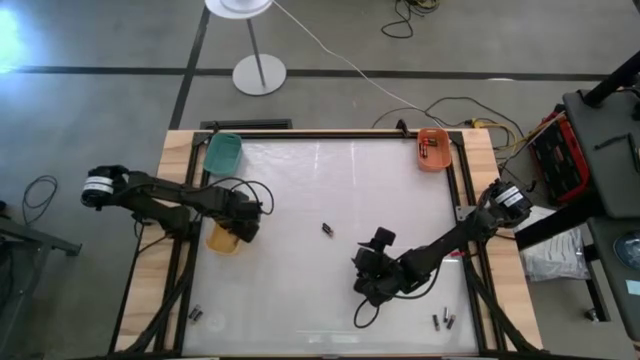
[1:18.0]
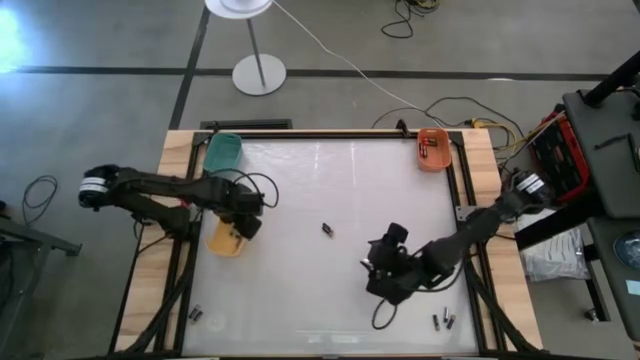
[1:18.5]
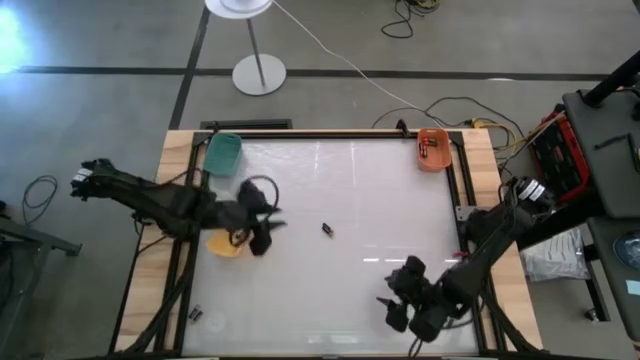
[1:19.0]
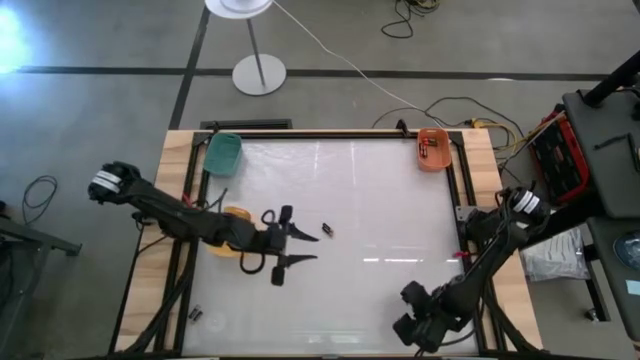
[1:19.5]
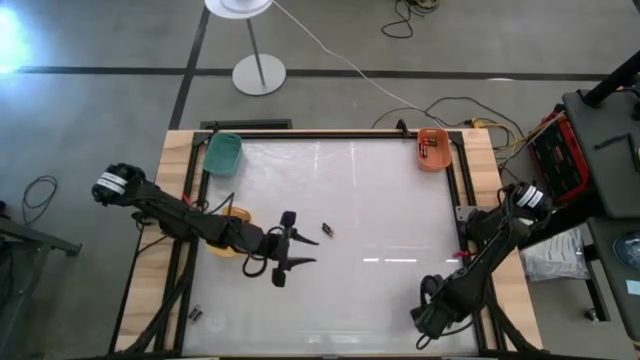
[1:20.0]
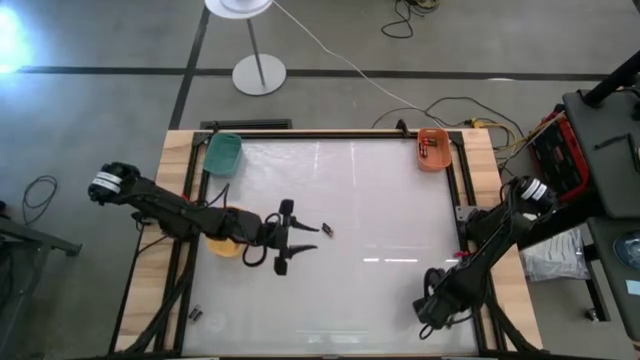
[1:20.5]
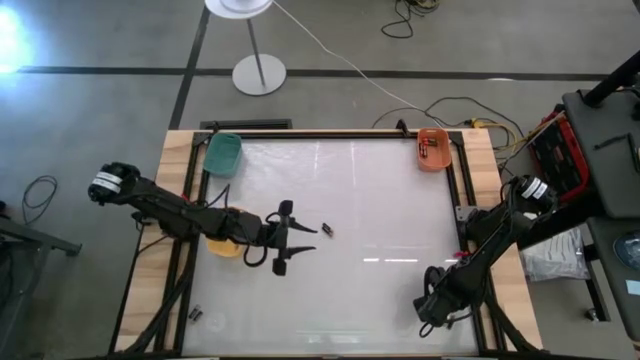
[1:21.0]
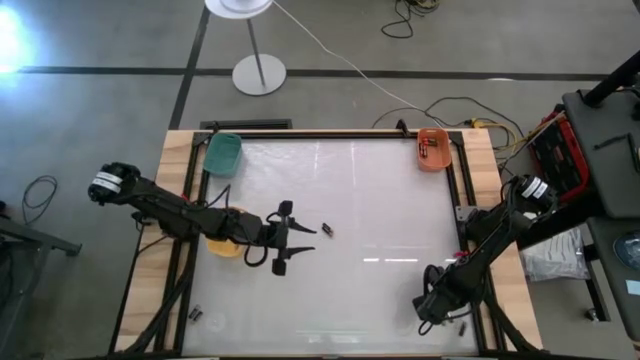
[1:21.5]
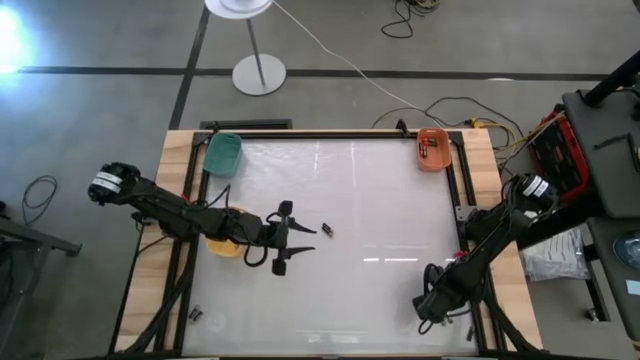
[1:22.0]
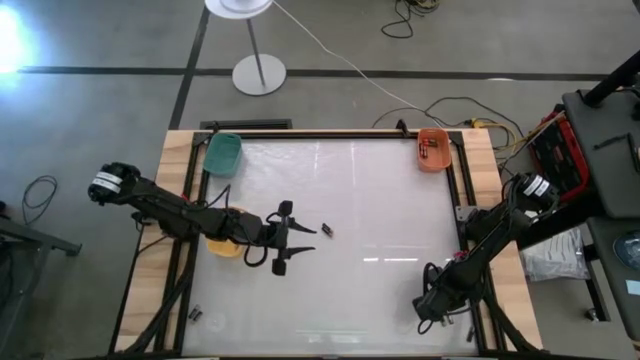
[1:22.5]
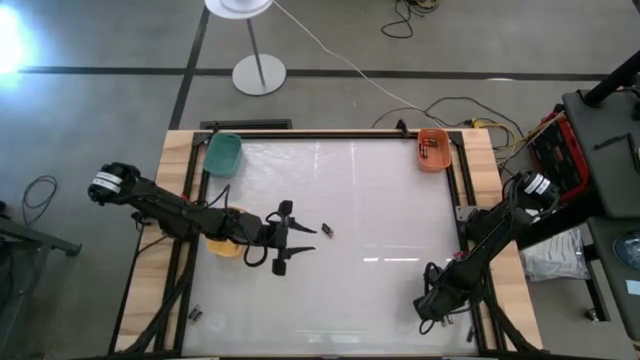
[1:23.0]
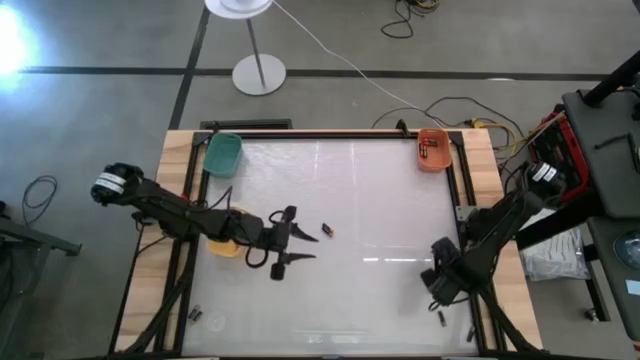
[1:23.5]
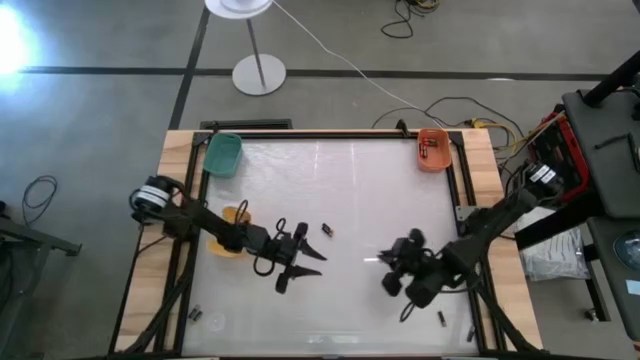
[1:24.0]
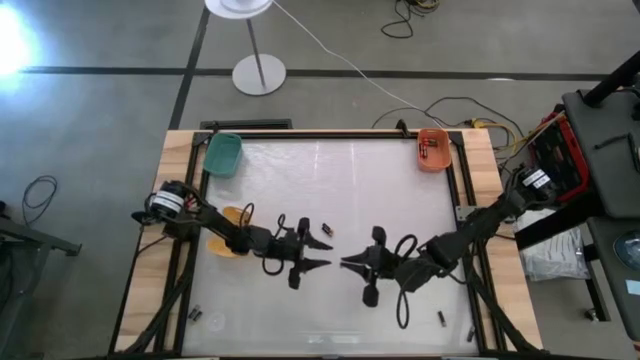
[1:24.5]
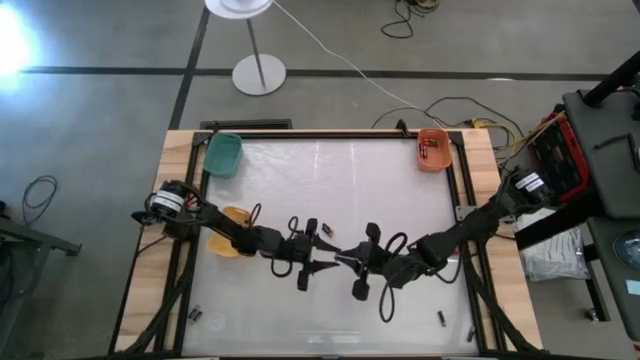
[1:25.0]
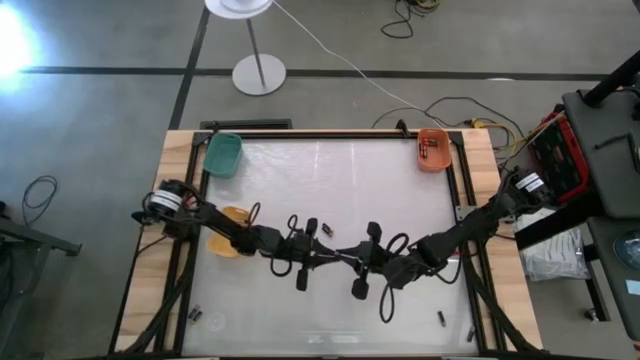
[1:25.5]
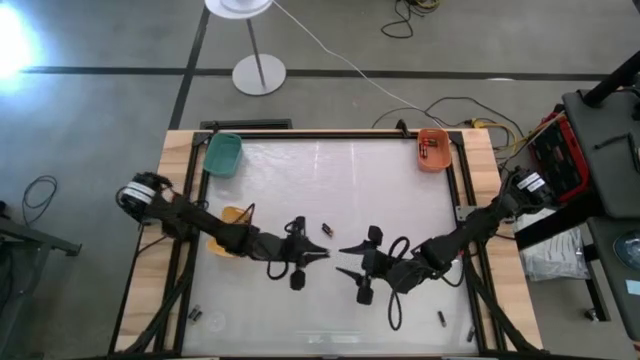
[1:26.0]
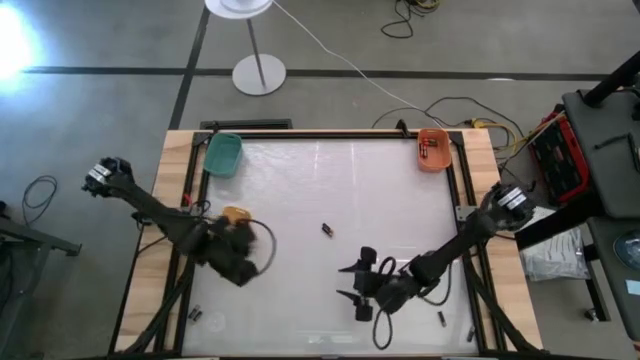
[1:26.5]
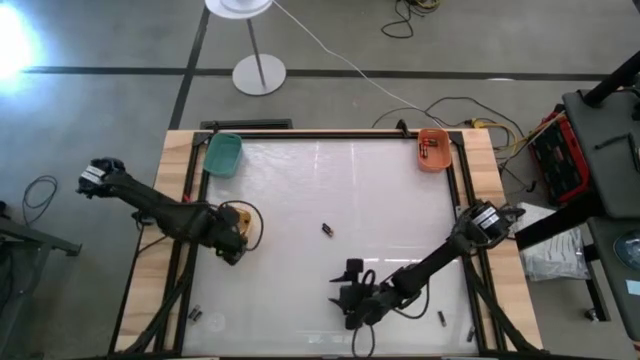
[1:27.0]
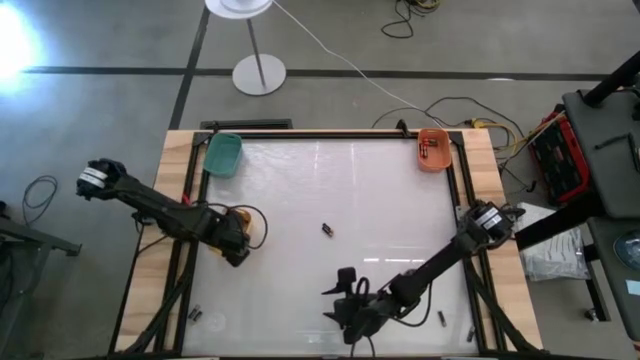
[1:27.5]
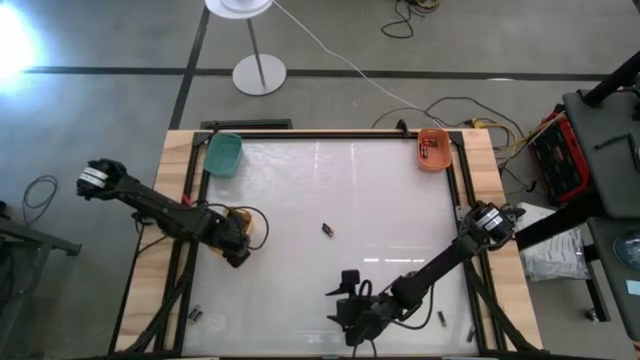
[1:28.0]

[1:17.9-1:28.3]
Task: Sort batteries
Put the silver battery into the yellow bin

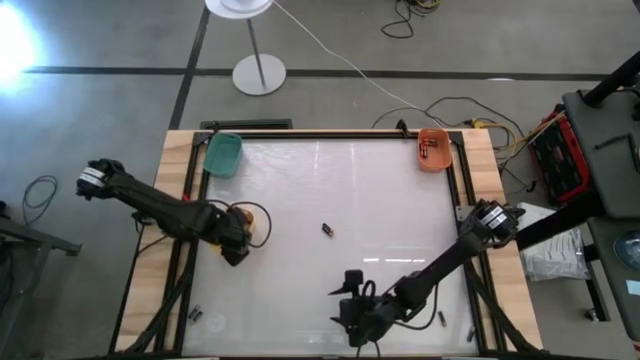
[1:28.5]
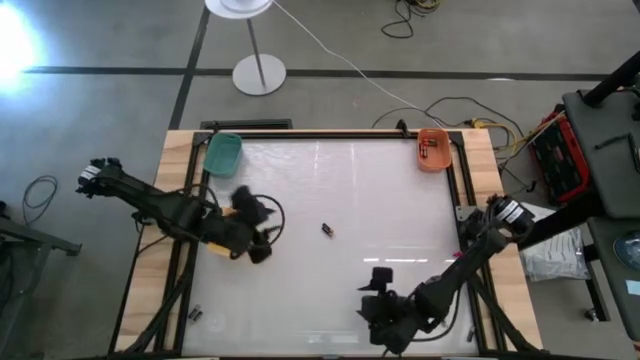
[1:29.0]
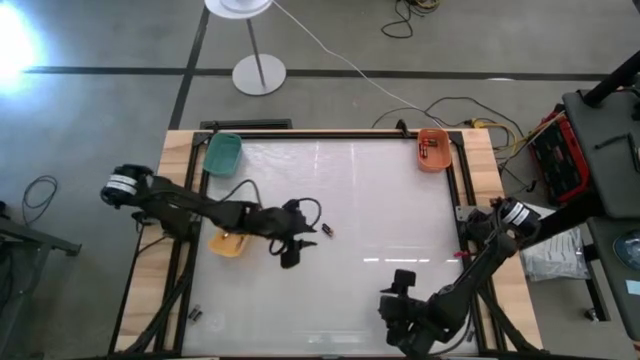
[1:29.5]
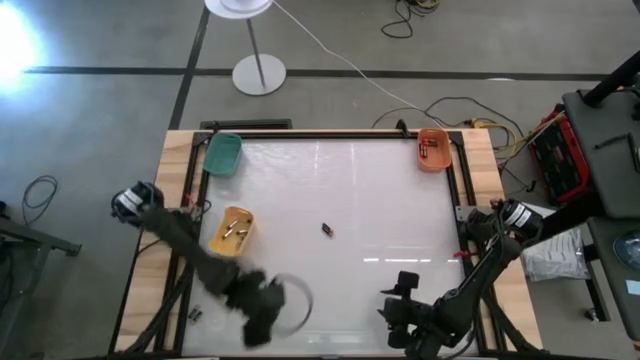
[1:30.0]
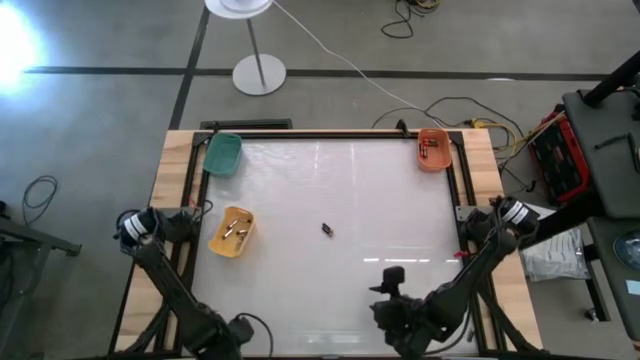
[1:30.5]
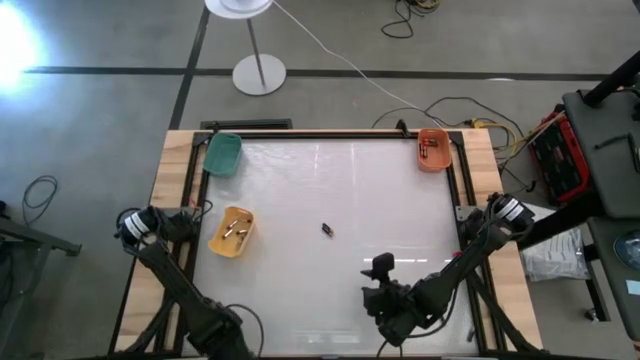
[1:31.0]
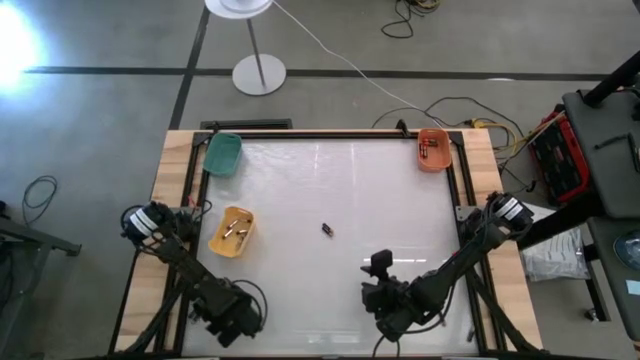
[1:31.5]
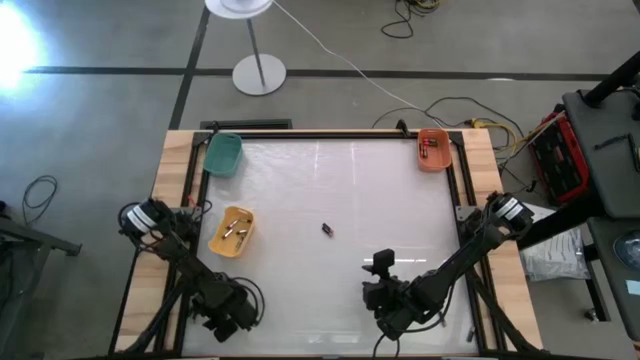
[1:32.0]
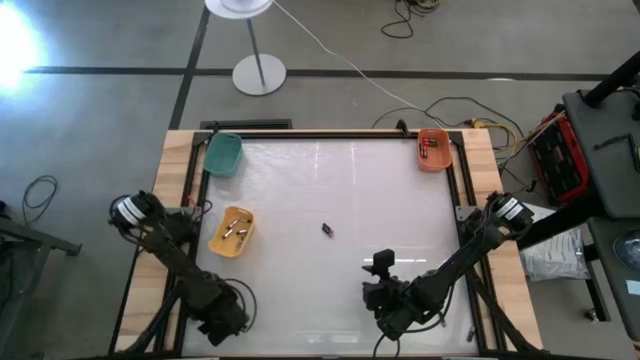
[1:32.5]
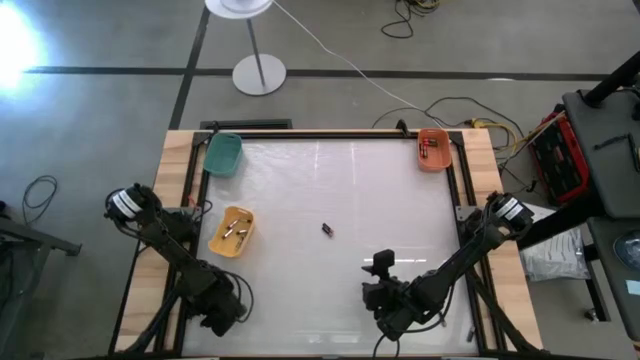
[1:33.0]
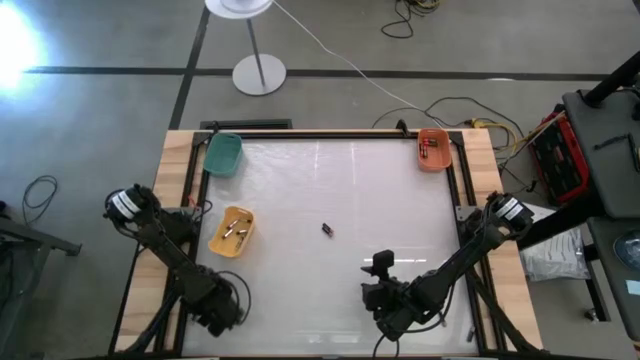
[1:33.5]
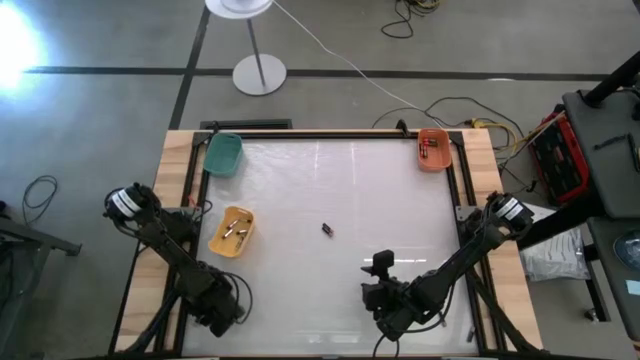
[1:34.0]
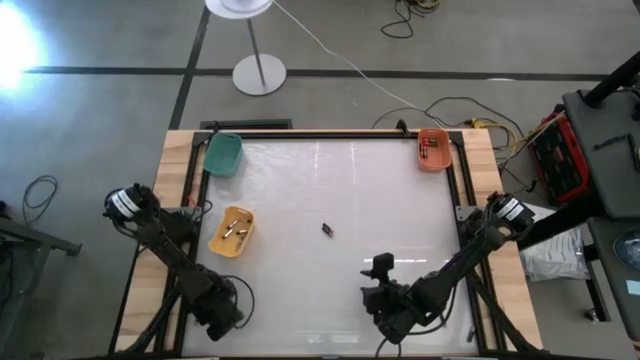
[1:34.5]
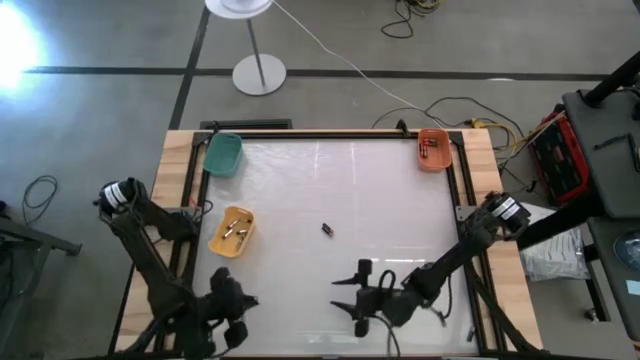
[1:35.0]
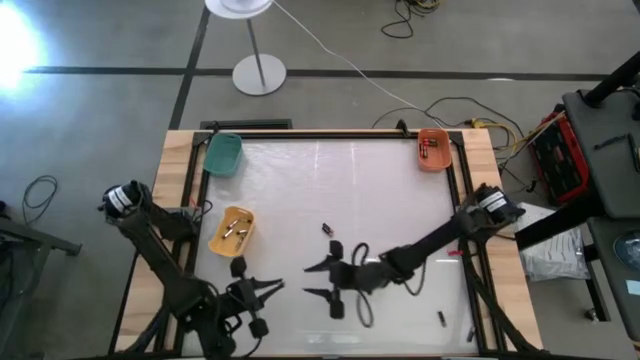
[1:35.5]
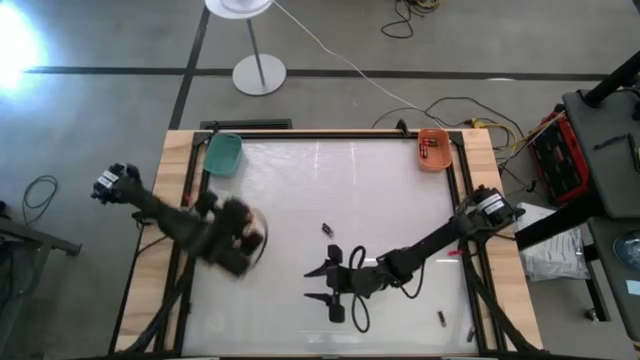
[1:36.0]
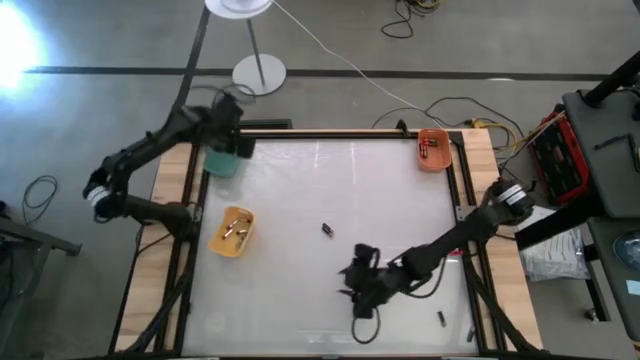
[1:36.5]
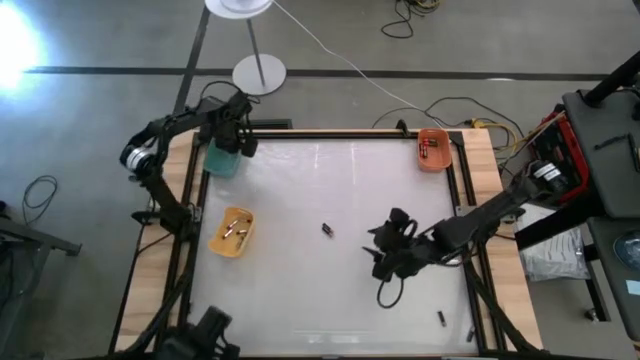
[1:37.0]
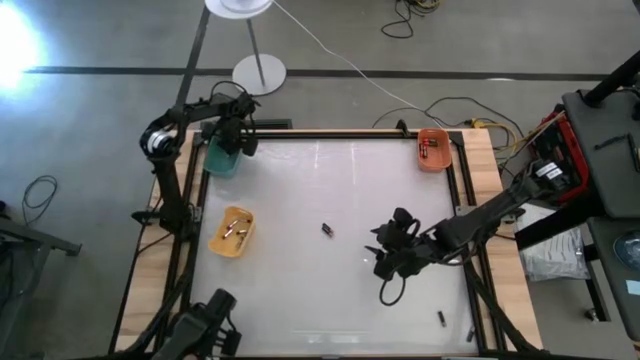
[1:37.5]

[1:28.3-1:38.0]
Put the black battery into the green bin

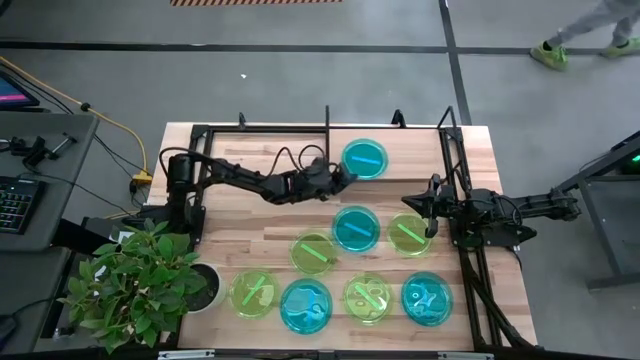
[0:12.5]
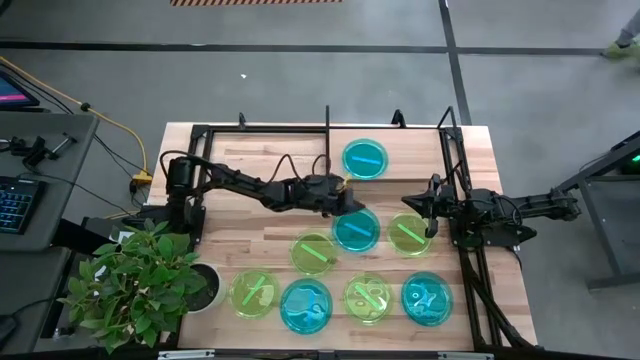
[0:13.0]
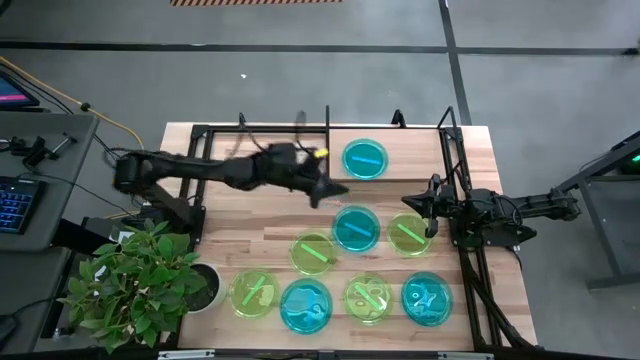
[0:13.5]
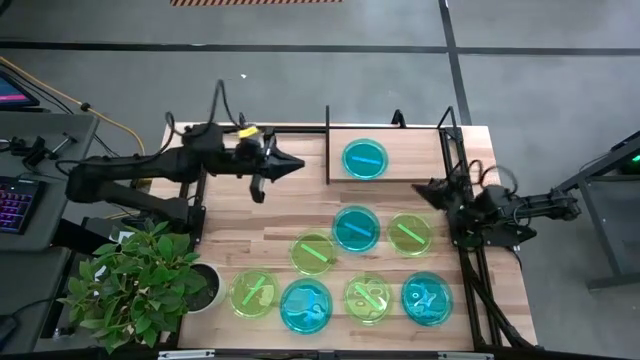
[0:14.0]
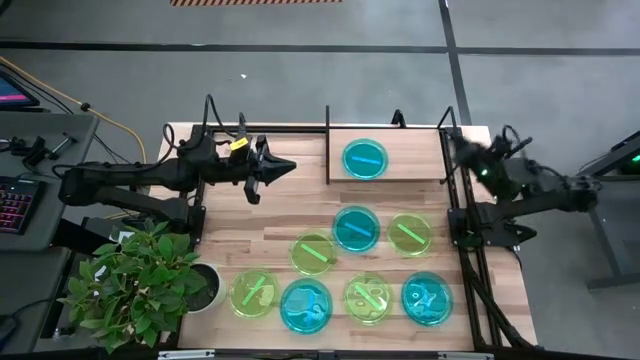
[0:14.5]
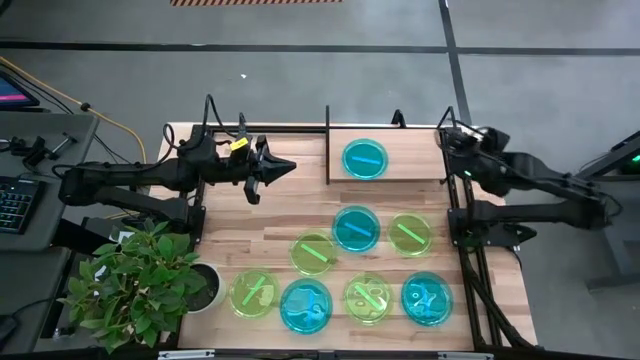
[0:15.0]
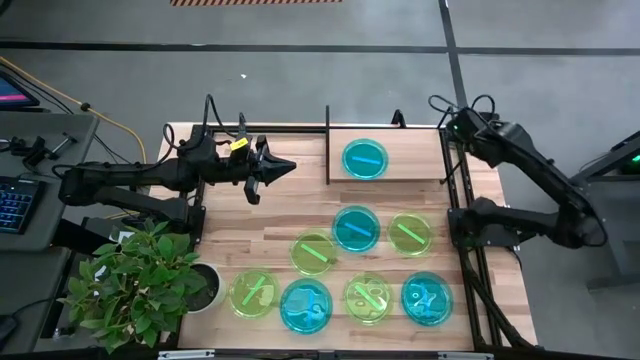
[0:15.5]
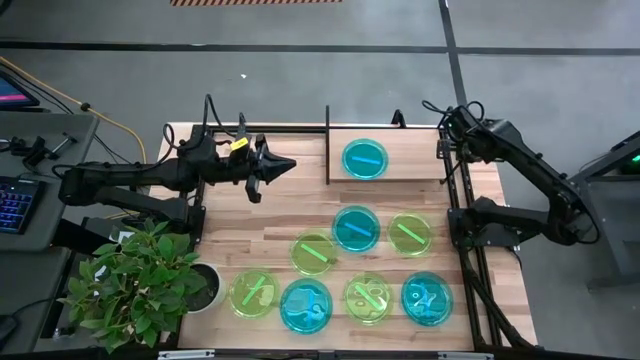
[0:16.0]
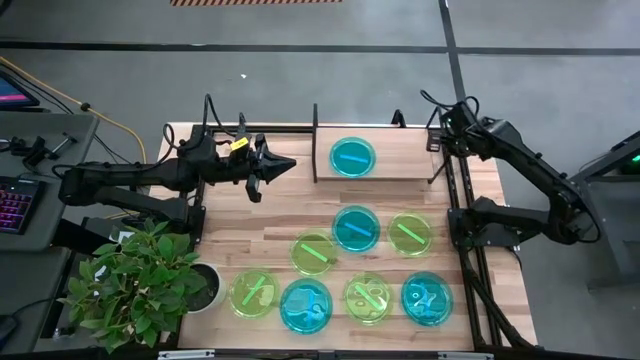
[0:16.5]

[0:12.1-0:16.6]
Task: Place and stack plates onto a shelf
Adjust the shelf
